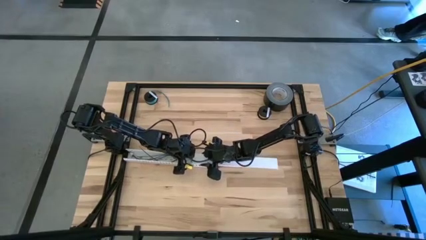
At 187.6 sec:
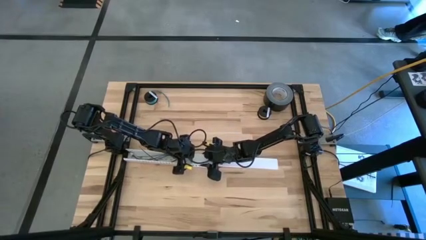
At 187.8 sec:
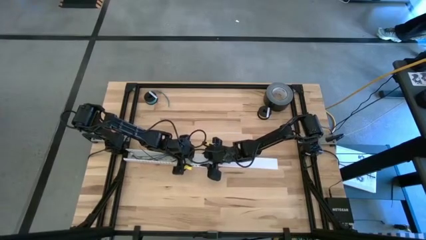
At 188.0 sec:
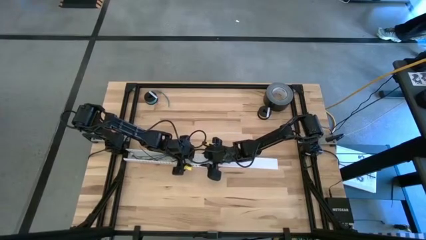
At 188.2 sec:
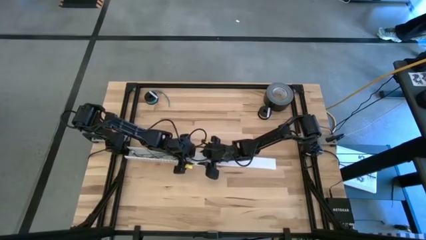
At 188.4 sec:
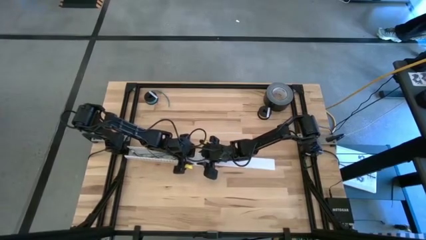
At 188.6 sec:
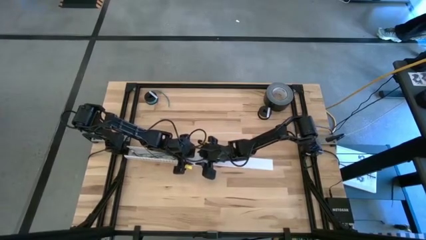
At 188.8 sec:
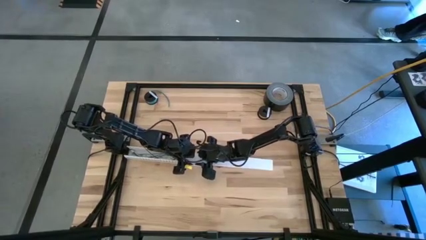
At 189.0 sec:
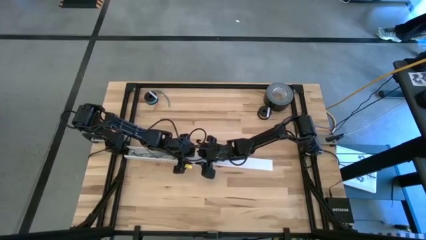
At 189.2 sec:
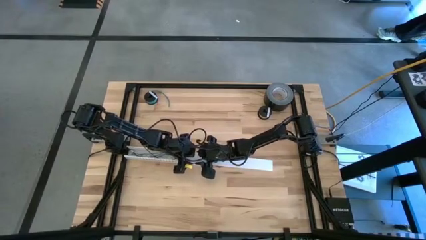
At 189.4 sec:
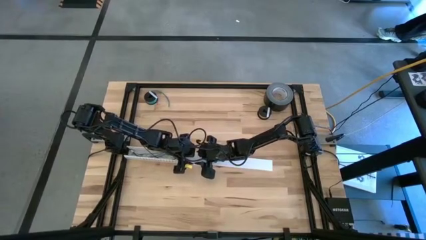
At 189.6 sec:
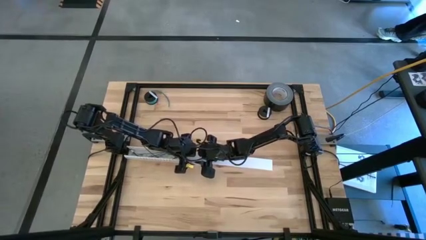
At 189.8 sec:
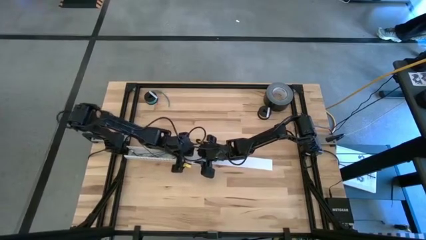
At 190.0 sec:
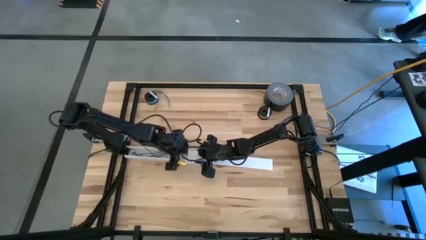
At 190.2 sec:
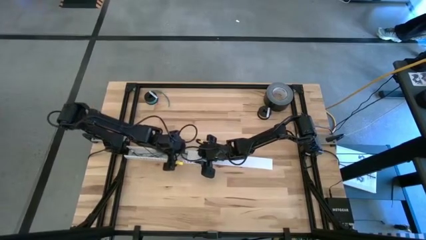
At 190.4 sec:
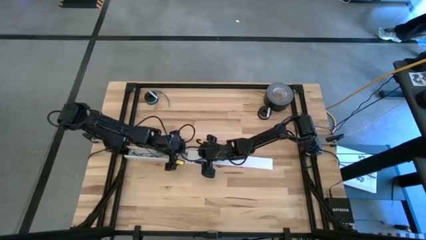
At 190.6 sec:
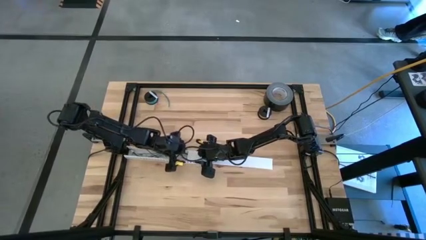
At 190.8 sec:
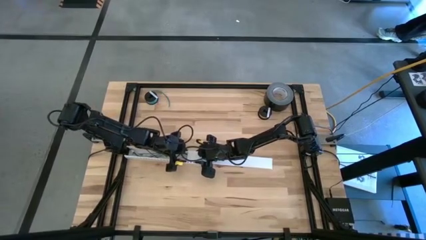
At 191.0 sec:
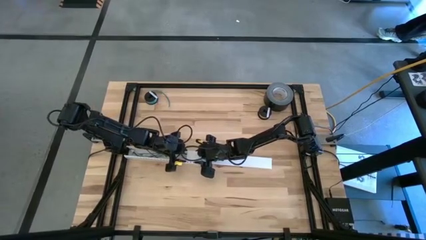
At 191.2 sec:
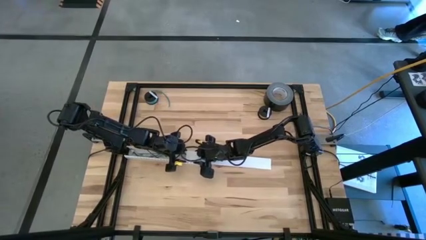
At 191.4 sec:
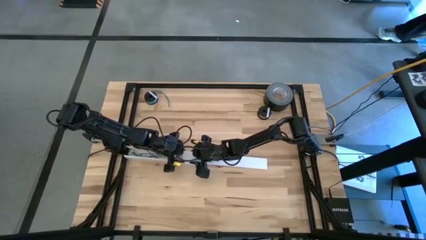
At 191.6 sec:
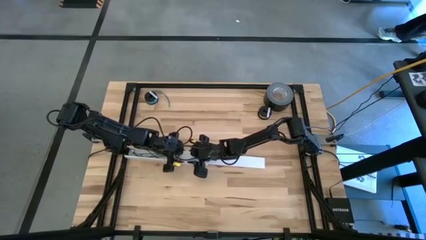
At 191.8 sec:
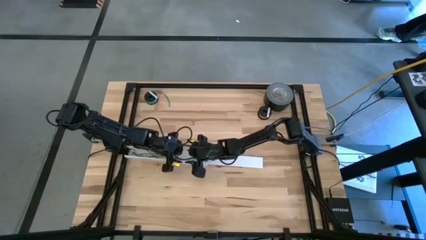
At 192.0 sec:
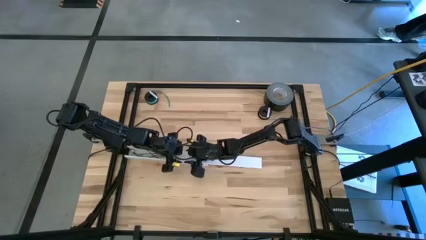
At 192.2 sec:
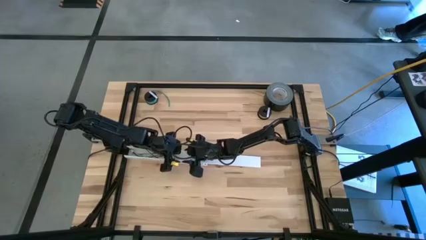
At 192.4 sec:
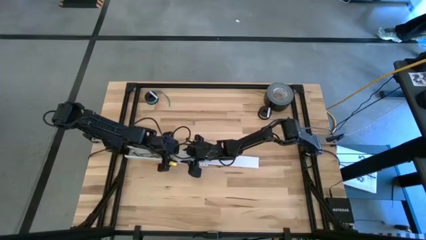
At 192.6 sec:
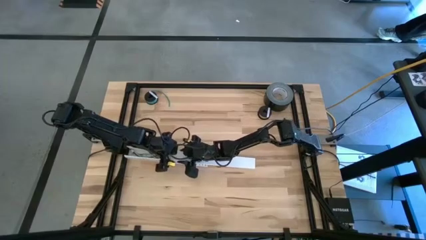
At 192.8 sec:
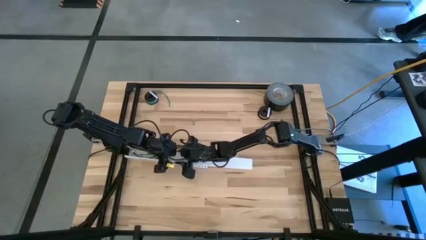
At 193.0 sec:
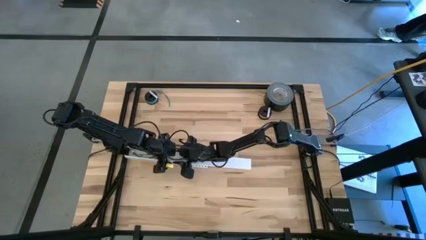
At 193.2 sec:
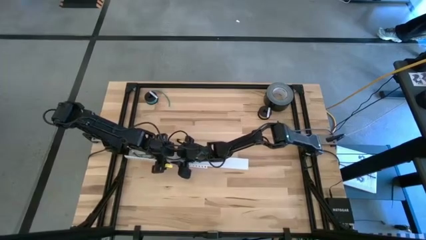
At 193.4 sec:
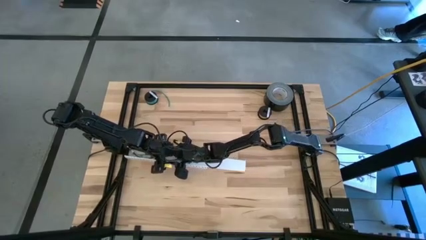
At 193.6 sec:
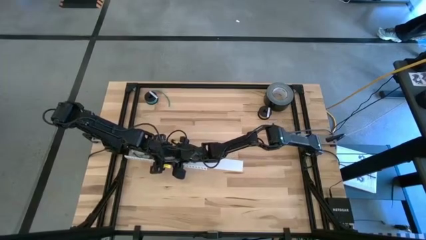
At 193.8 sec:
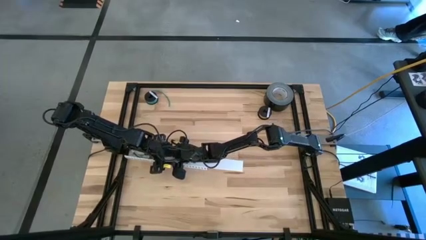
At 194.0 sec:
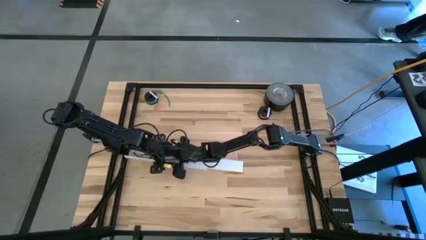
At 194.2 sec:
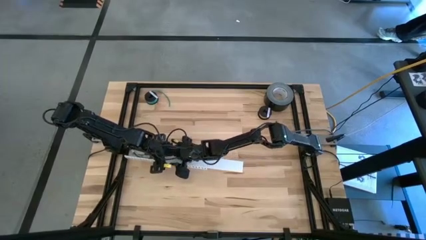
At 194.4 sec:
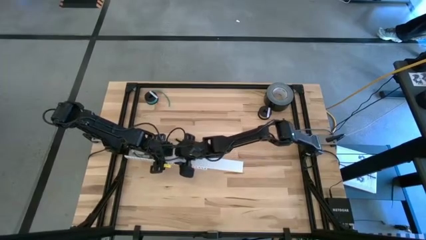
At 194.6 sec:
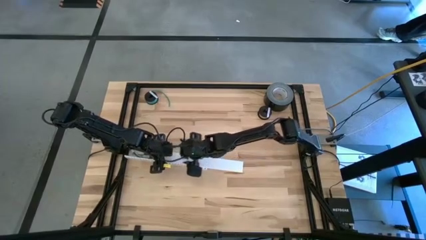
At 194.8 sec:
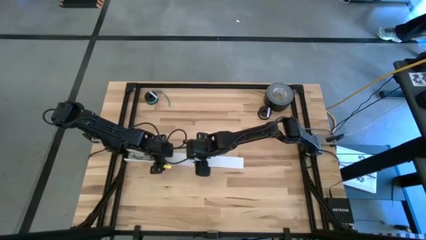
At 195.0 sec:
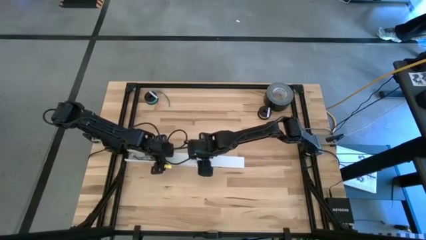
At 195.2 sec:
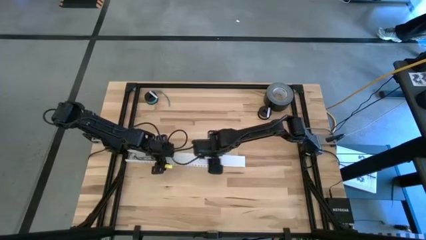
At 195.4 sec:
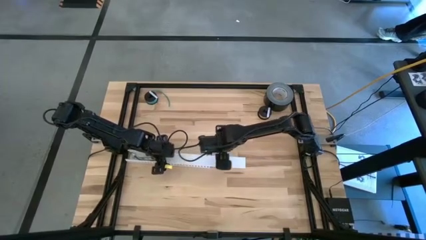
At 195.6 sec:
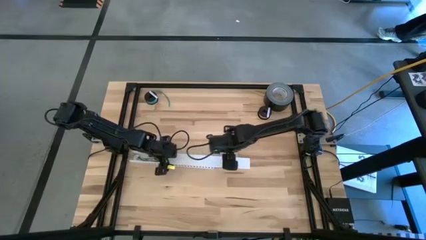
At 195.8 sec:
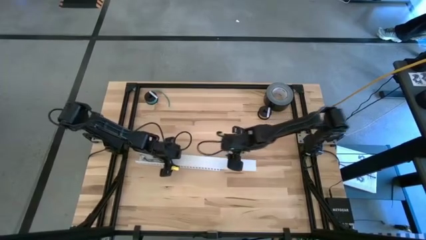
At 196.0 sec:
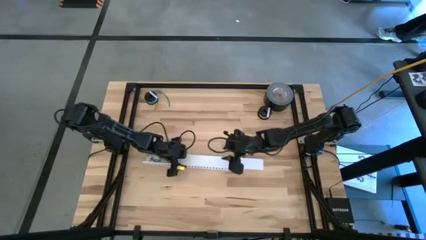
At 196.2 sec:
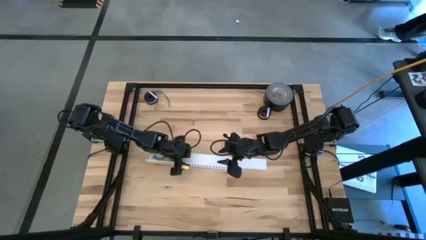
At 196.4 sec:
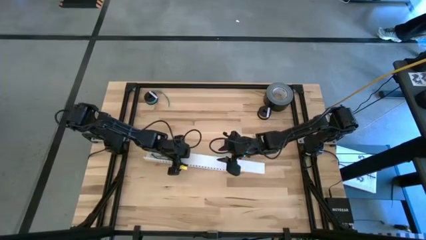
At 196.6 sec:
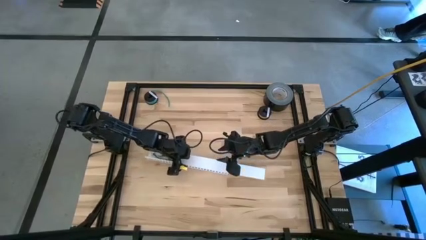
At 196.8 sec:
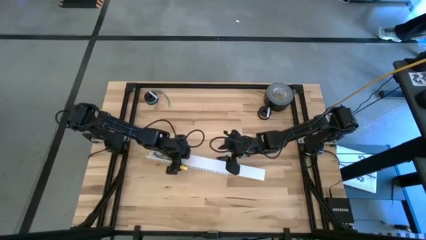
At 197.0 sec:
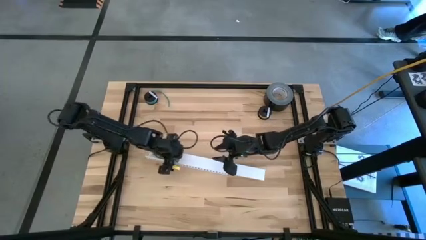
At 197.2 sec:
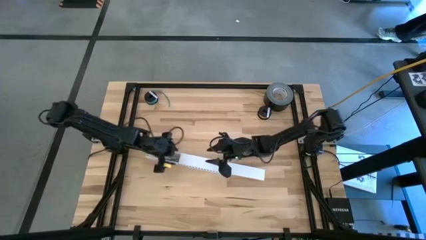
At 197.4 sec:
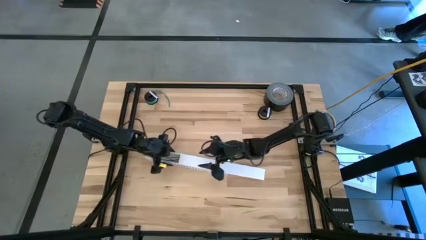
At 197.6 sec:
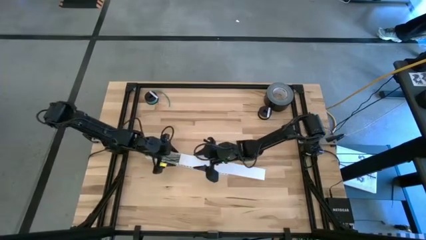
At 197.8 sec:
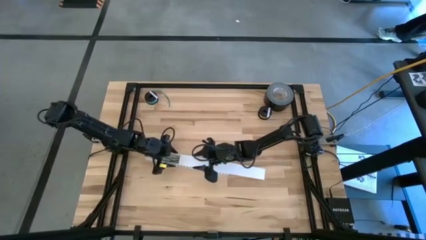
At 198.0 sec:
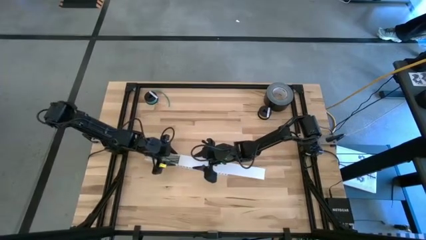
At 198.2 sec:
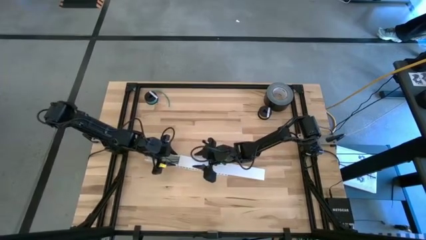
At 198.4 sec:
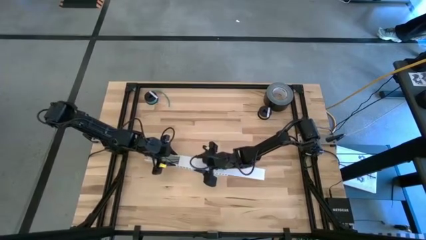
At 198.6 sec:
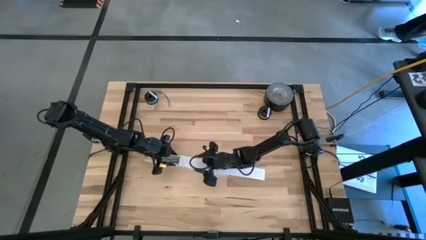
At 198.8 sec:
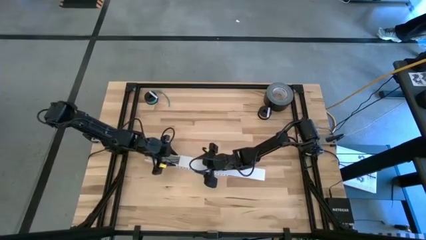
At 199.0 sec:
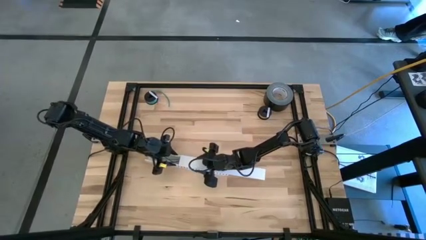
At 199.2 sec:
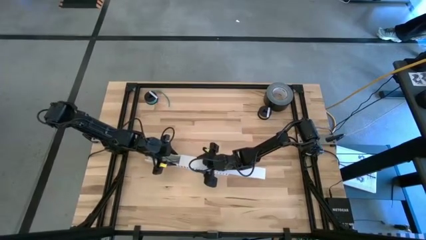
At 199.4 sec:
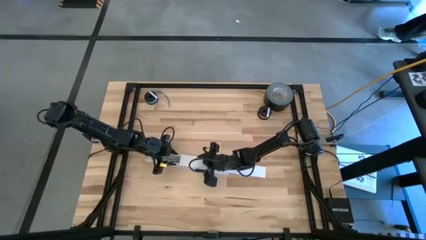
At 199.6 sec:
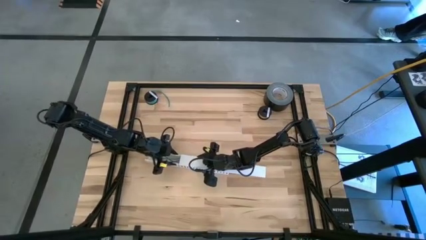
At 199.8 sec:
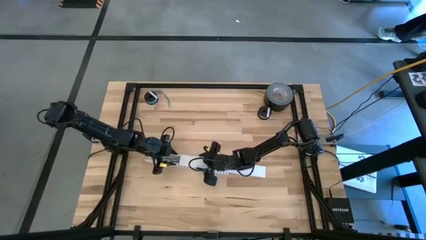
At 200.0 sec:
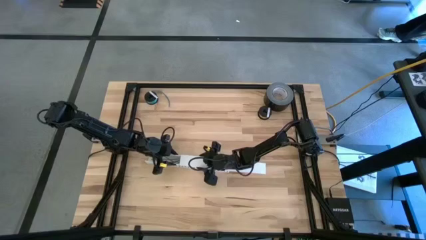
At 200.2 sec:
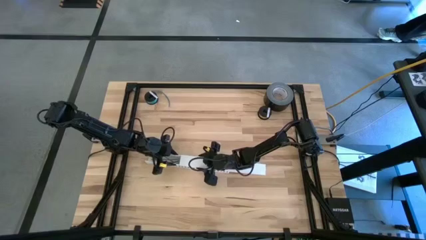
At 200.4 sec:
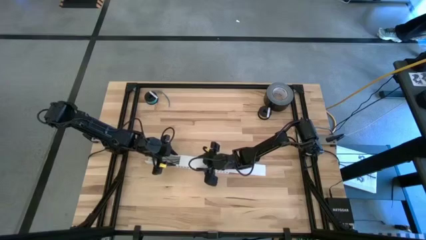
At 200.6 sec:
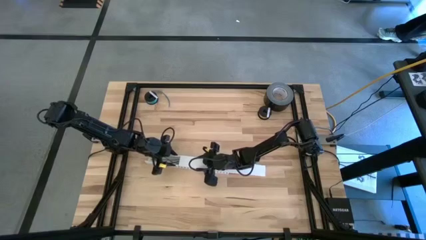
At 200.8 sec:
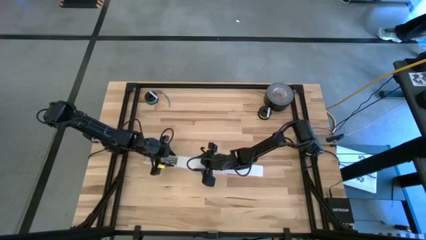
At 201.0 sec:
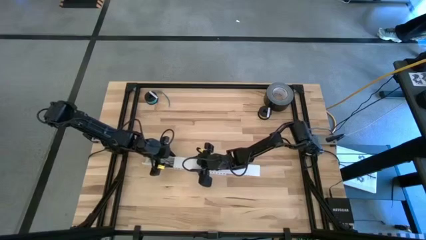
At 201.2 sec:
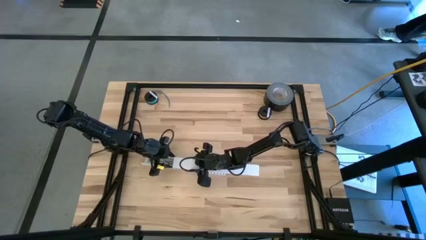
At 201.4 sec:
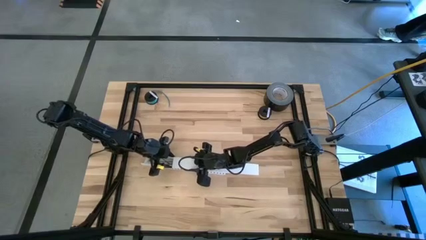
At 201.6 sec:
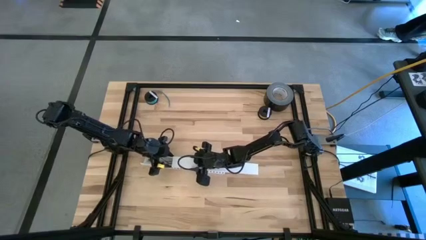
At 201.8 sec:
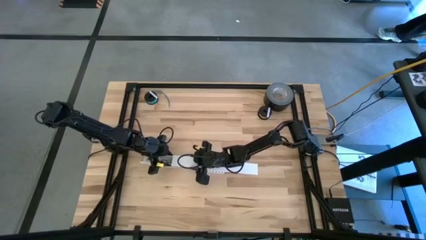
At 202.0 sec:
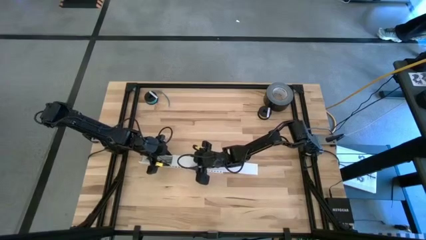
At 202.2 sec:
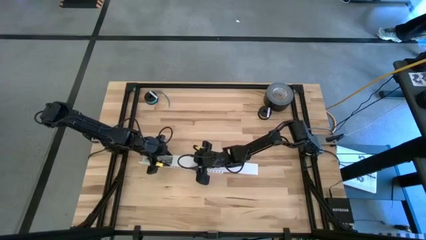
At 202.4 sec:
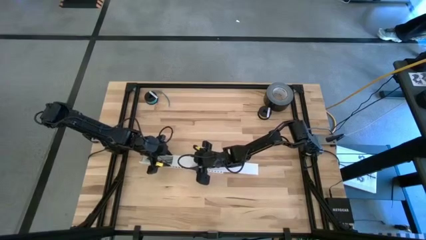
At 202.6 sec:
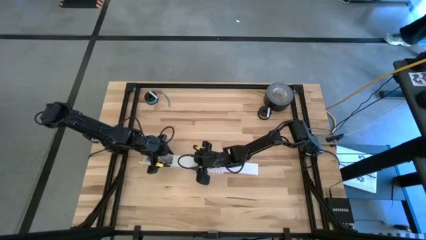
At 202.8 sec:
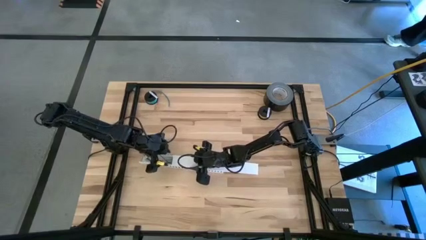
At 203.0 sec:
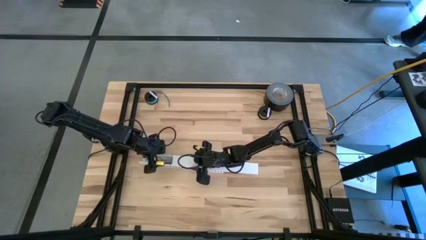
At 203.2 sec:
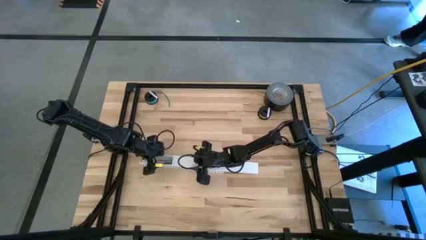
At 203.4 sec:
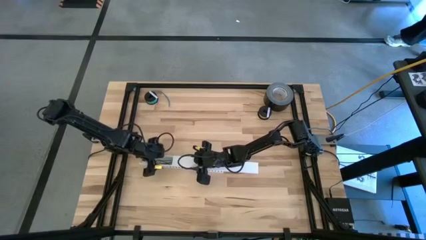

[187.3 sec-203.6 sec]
Task: Ziptie cables
Close the white cable duct
